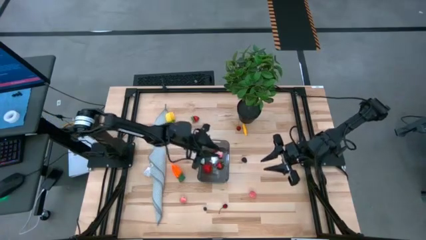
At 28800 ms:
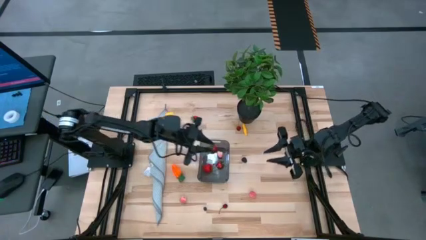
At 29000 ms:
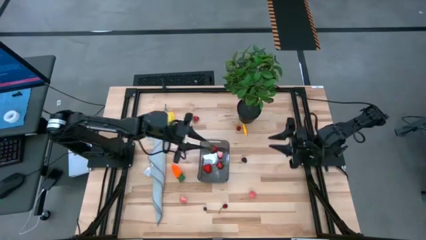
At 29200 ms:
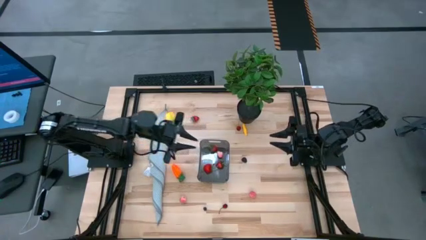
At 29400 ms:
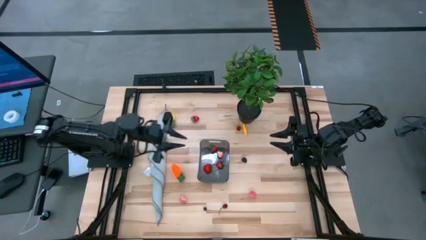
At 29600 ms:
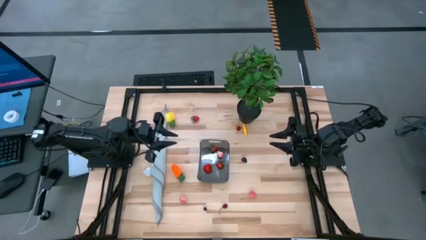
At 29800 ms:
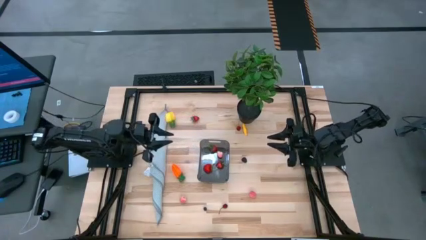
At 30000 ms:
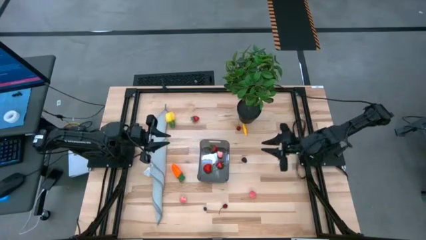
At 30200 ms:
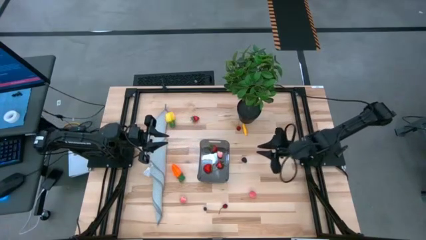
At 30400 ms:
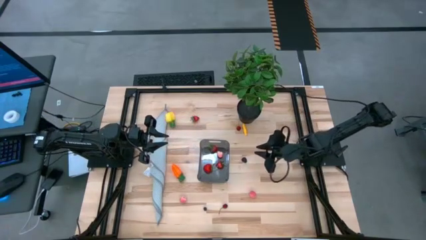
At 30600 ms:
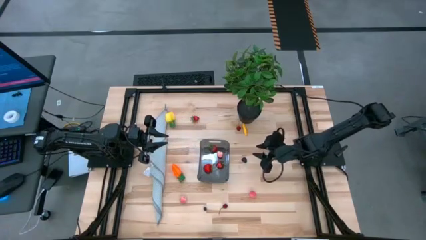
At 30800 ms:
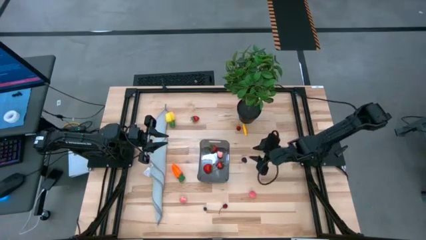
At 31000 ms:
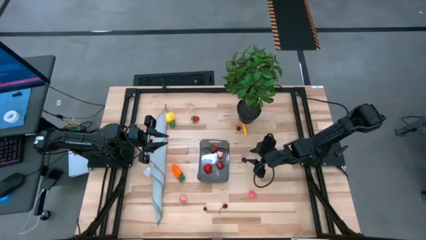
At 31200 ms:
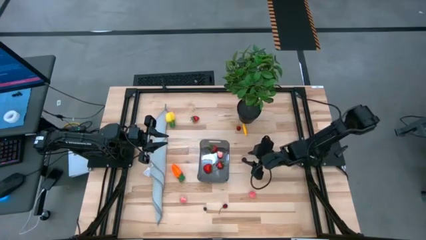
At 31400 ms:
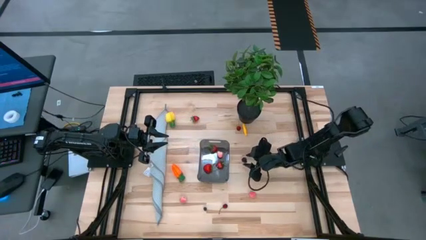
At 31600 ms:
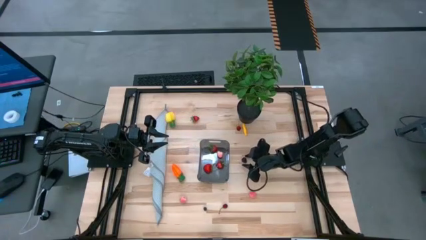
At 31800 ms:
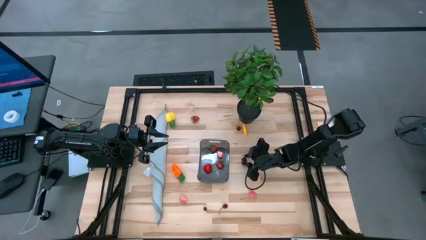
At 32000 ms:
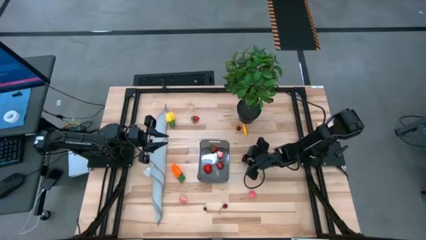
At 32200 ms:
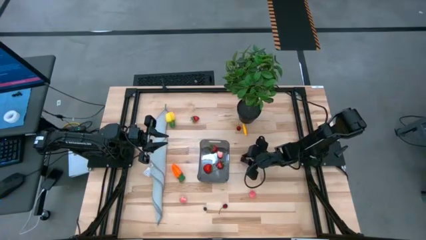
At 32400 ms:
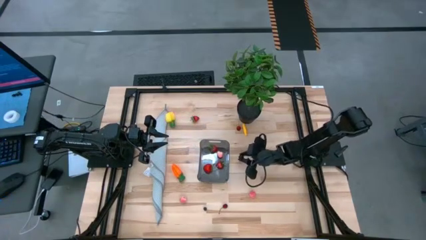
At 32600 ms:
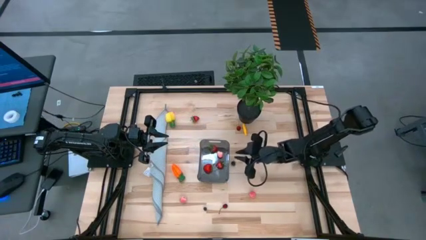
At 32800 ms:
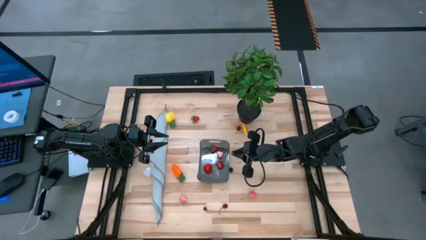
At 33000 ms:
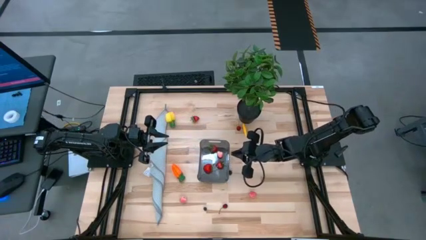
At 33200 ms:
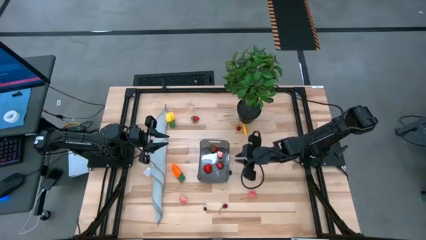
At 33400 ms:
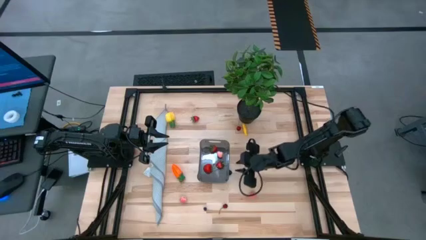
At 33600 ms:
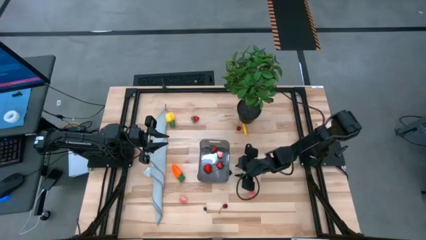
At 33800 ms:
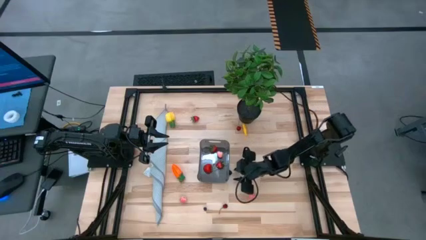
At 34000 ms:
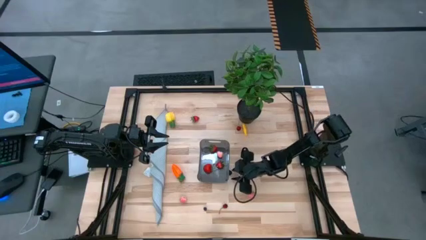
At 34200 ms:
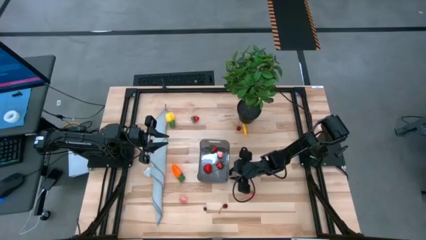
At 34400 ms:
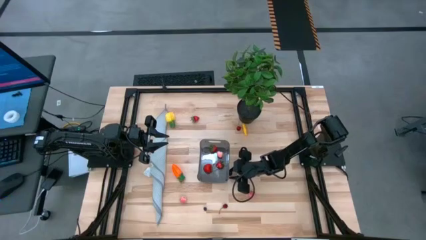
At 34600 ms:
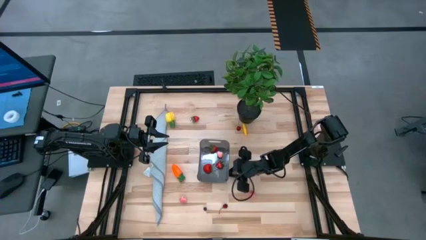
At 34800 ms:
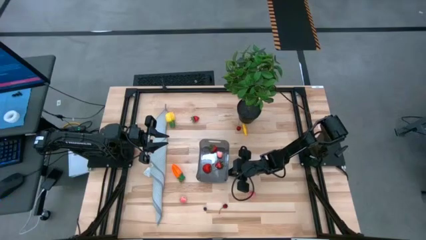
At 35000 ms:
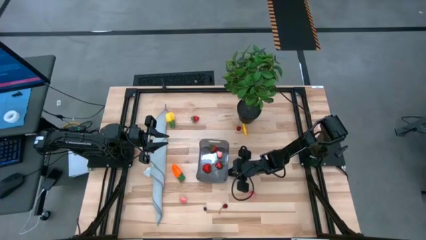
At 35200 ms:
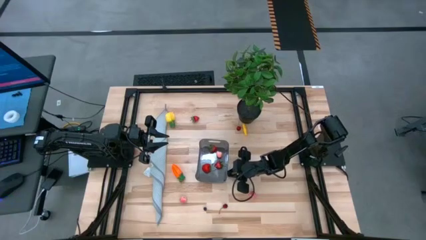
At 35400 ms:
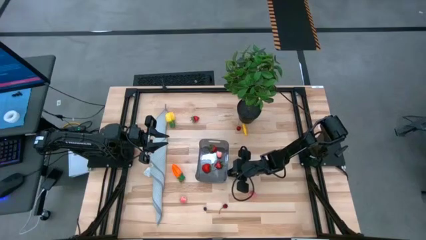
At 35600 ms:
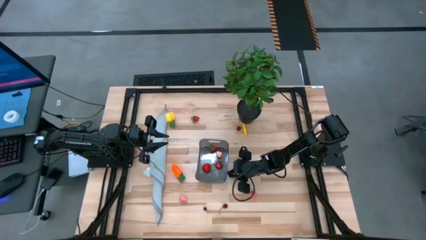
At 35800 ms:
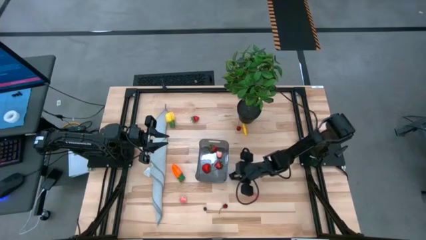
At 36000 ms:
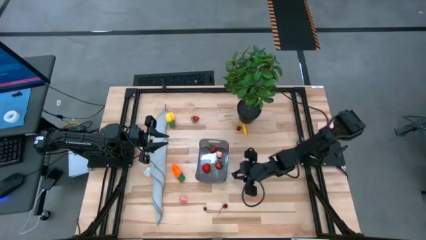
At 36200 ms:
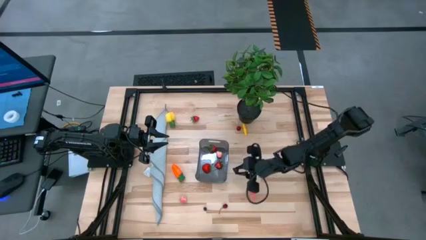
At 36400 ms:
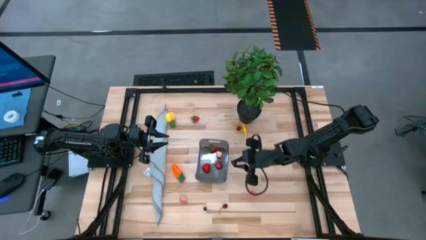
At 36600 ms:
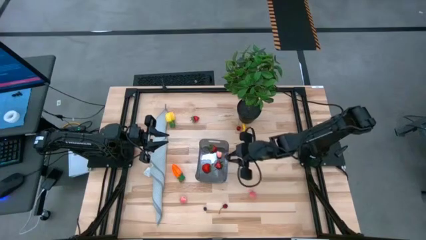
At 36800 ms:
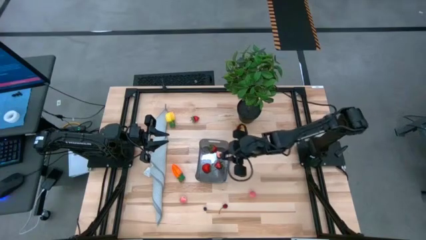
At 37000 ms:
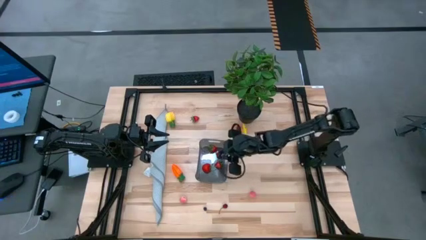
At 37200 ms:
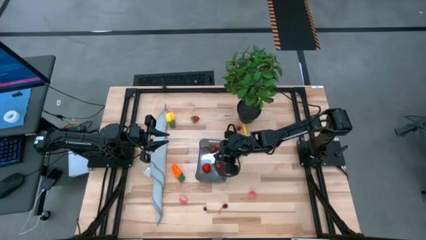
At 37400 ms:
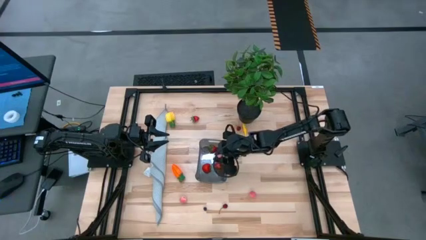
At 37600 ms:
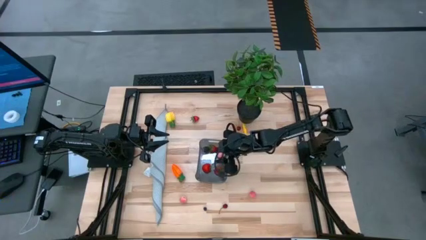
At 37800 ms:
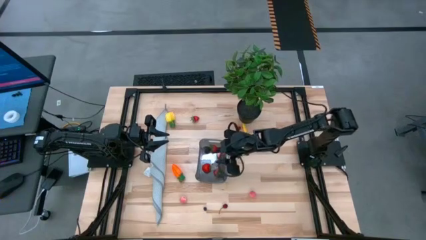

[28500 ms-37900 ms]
Task: Pick and placing Produce into tupperware
Put the blackberry into the bin

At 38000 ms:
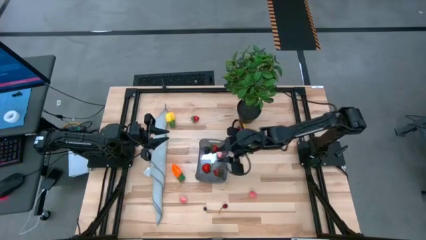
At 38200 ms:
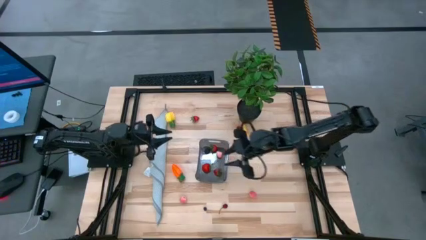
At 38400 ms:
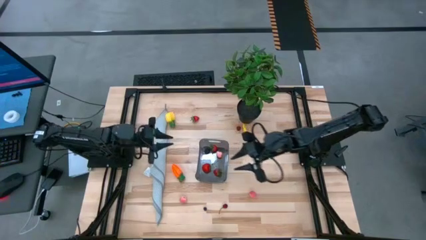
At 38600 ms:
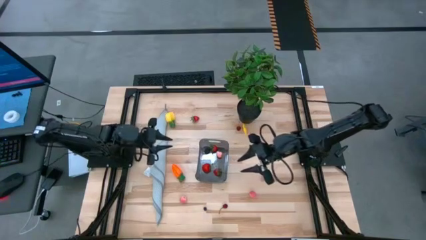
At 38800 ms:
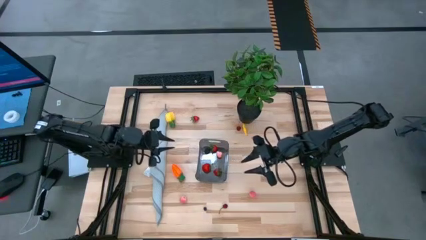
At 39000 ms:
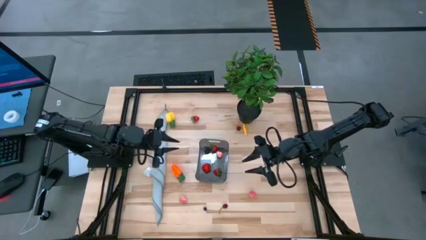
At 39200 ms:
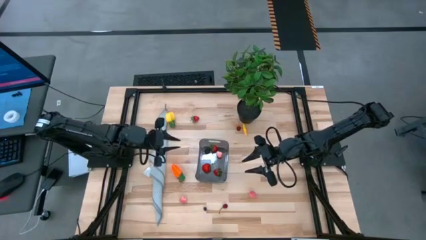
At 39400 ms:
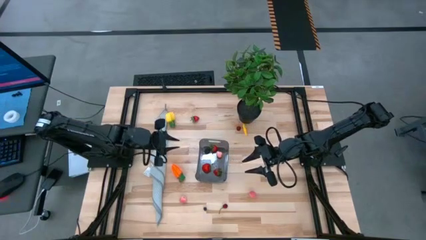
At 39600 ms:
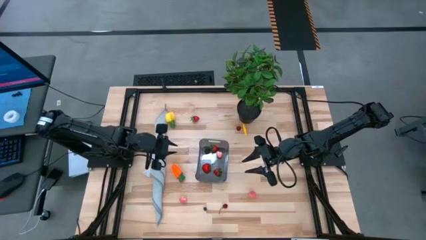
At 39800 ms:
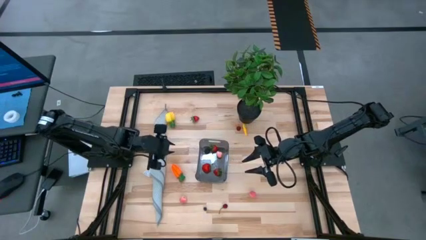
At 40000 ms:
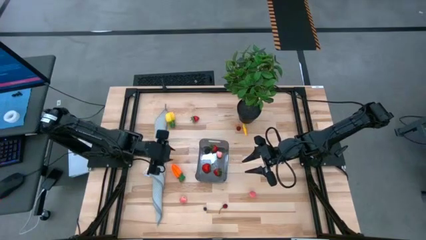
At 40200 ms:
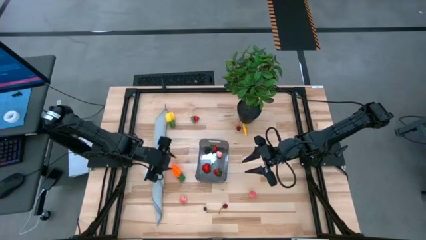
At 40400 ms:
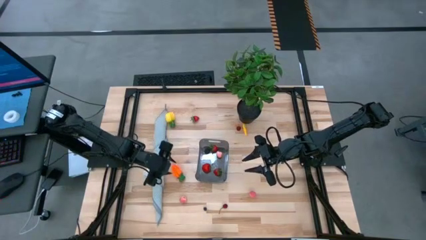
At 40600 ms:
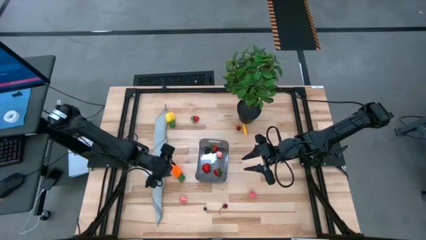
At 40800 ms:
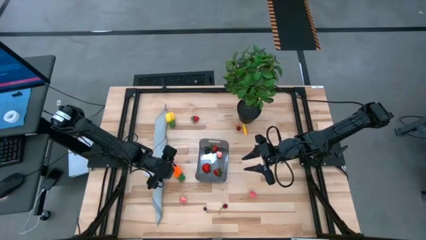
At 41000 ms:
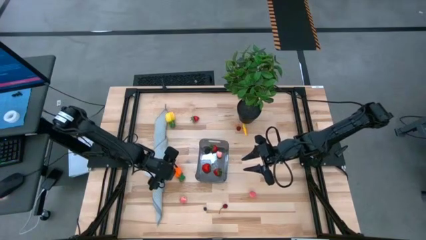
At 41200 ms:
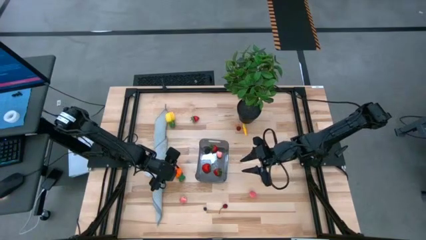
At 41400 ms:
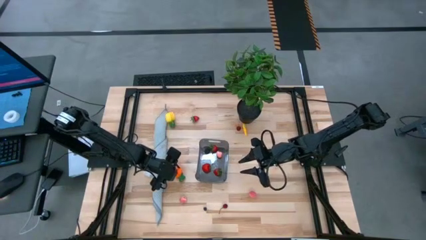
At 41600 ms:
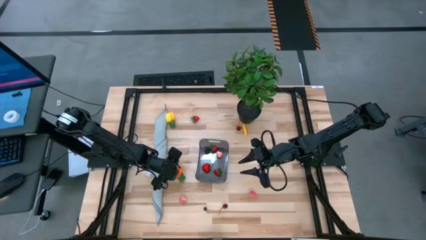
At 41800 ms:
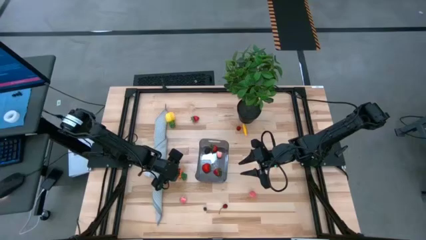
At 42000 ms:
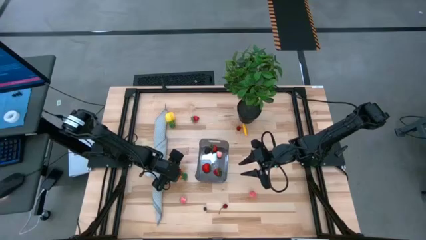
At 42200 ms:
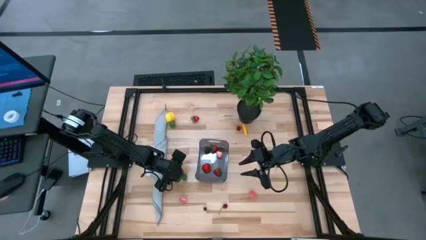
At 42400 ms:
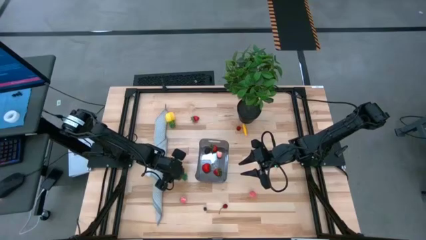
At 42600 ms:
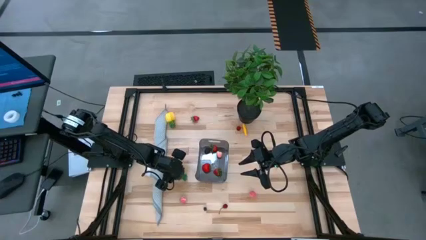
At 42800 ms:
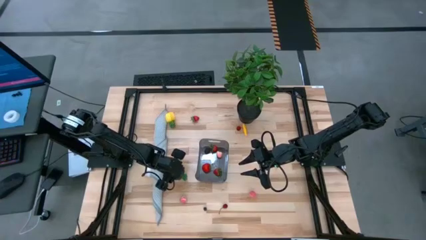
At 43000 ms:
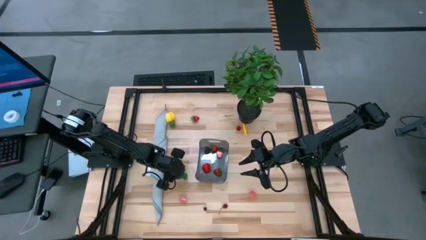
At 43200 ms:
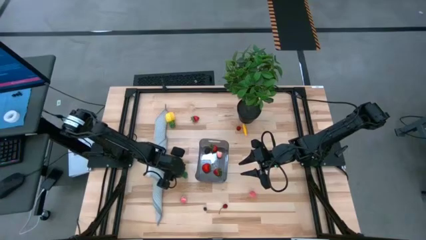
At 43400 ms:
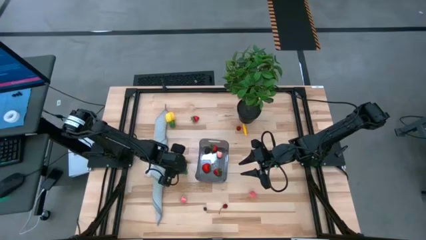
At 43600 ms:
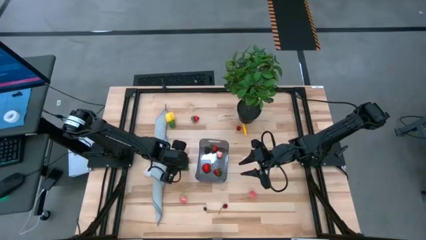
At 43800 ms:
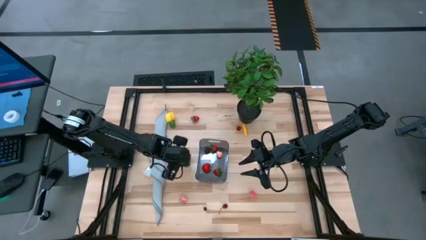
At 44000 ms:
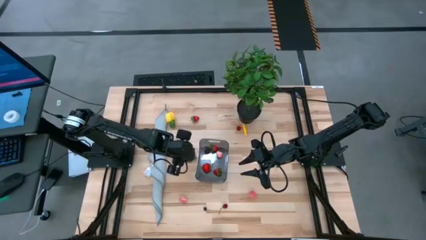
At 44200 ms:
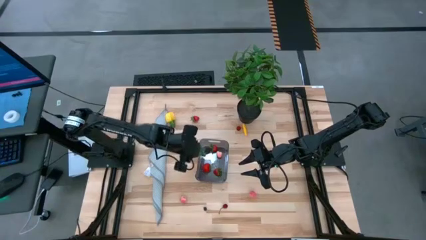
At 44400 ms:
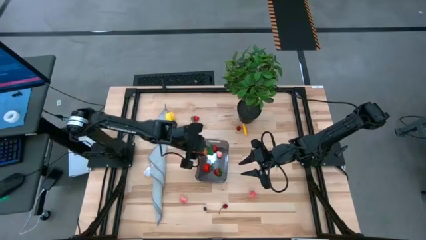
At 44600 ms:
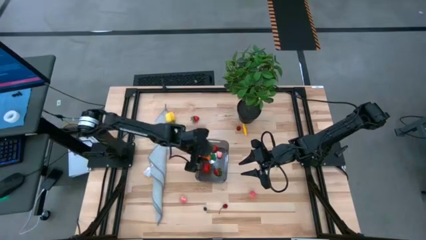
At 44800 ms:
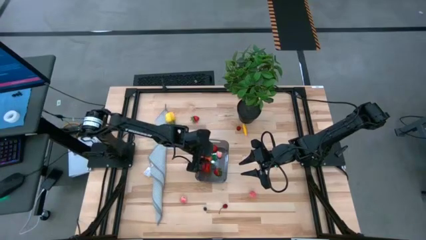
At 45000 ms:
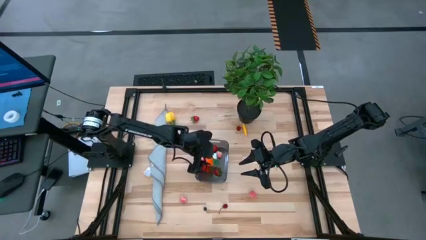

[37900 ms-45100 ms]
Put the carrot into the bin
